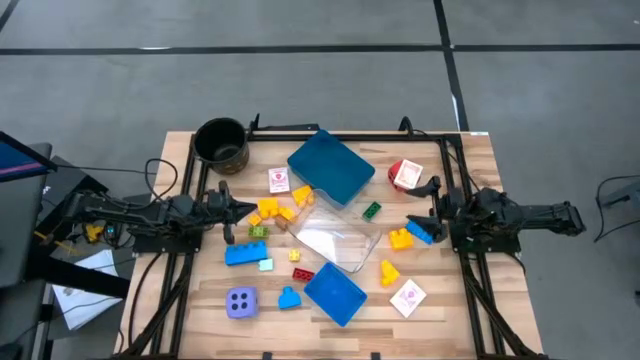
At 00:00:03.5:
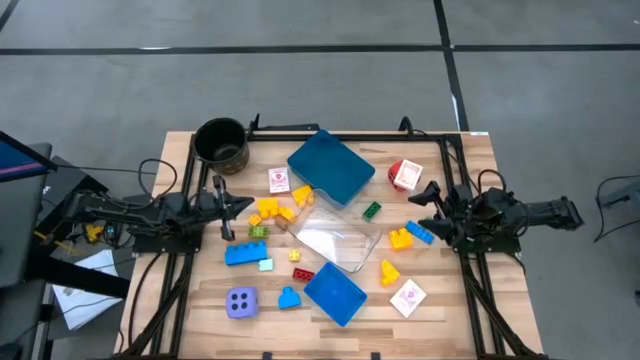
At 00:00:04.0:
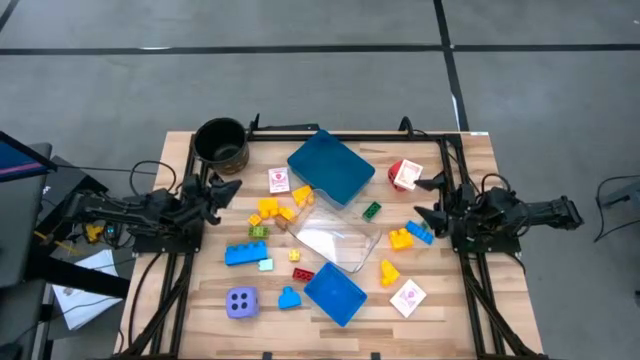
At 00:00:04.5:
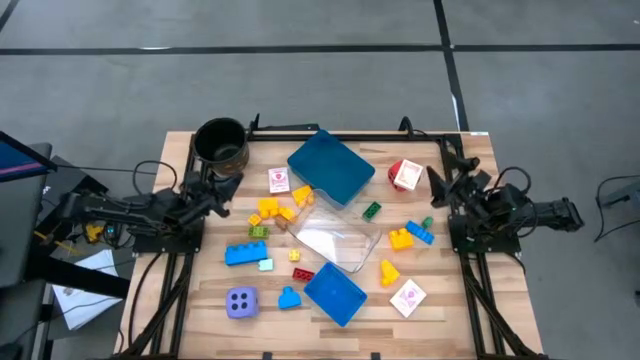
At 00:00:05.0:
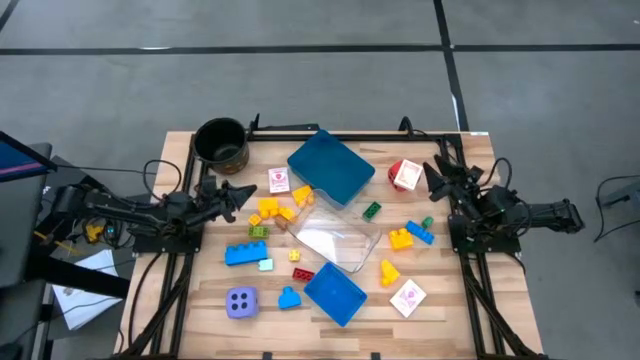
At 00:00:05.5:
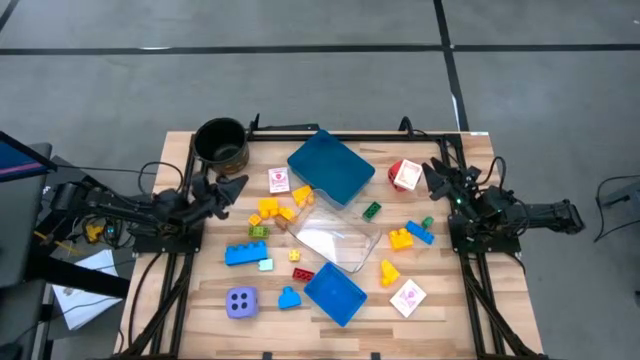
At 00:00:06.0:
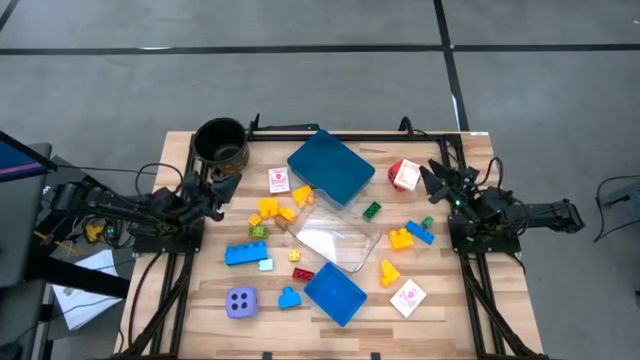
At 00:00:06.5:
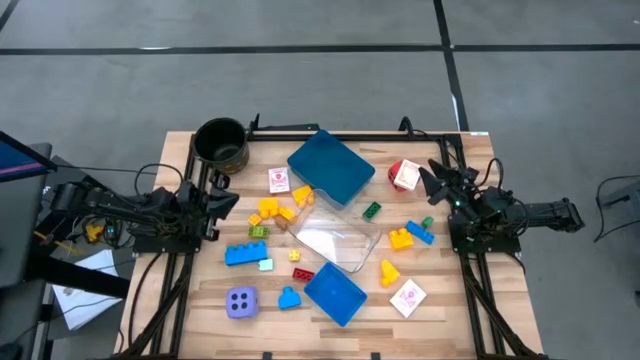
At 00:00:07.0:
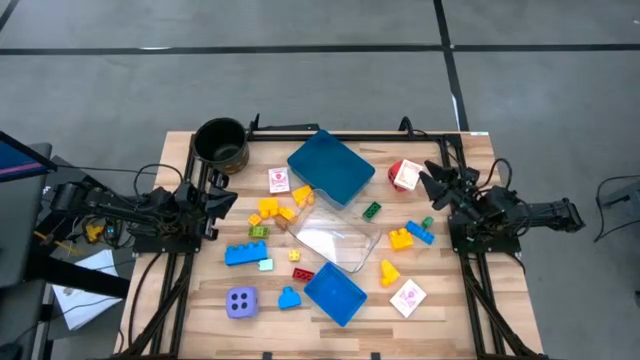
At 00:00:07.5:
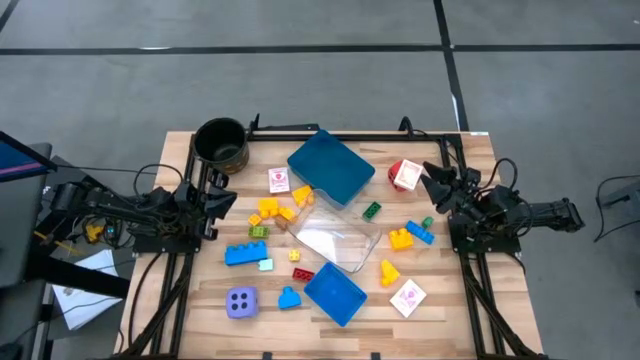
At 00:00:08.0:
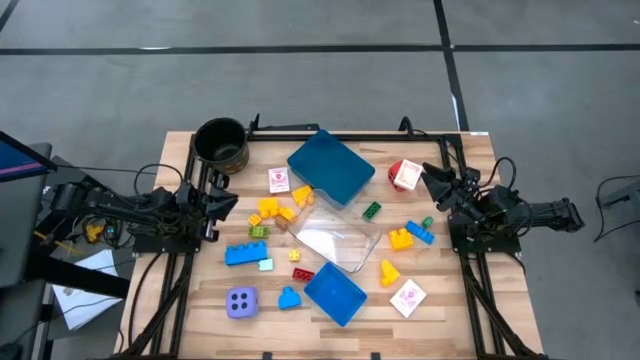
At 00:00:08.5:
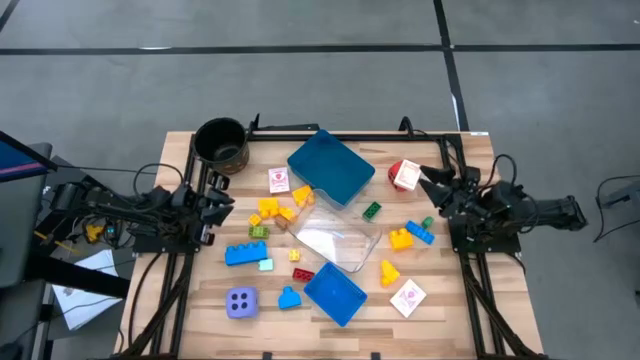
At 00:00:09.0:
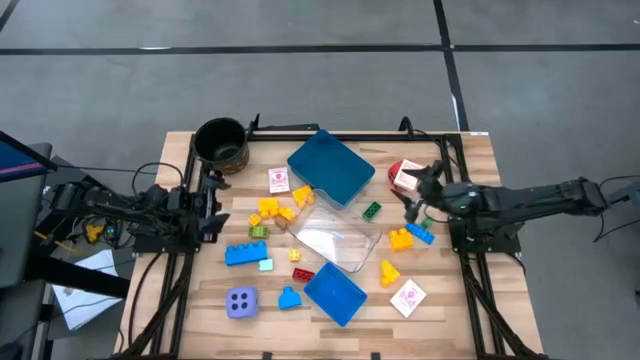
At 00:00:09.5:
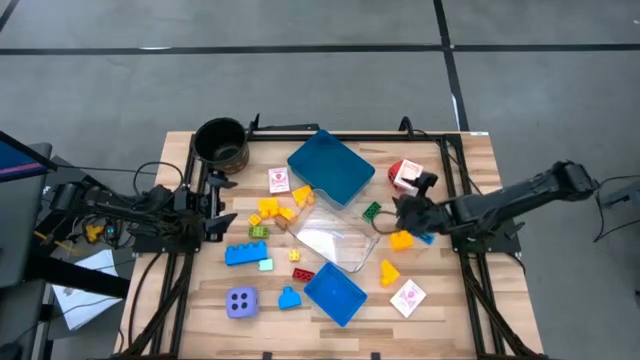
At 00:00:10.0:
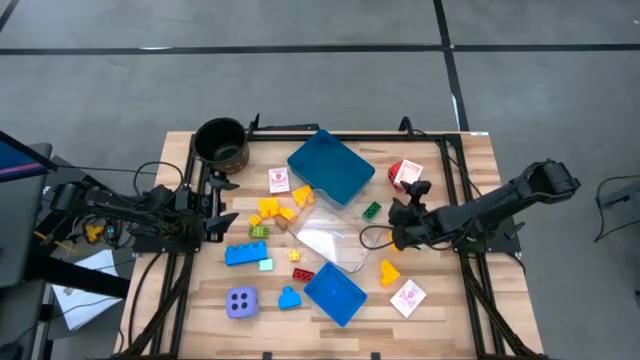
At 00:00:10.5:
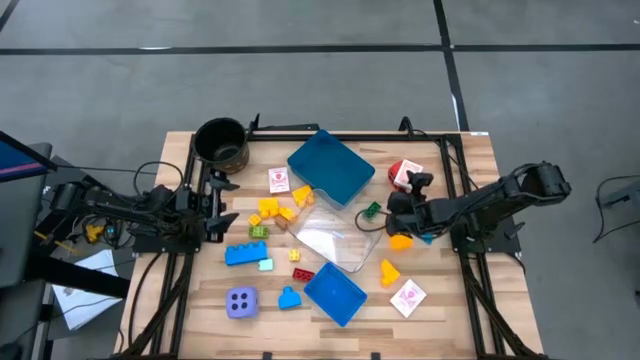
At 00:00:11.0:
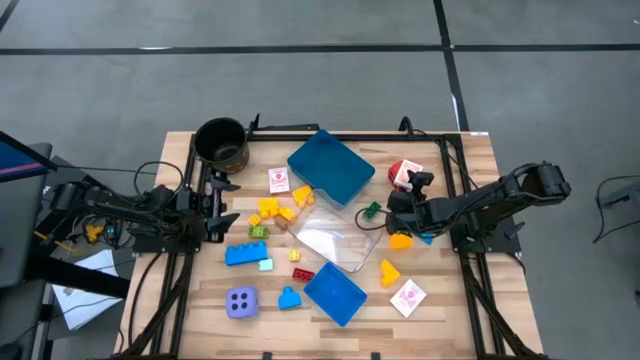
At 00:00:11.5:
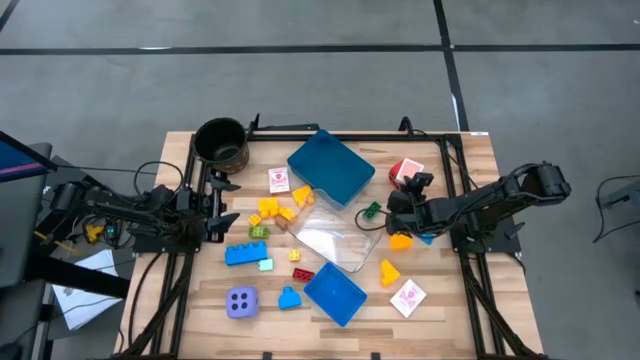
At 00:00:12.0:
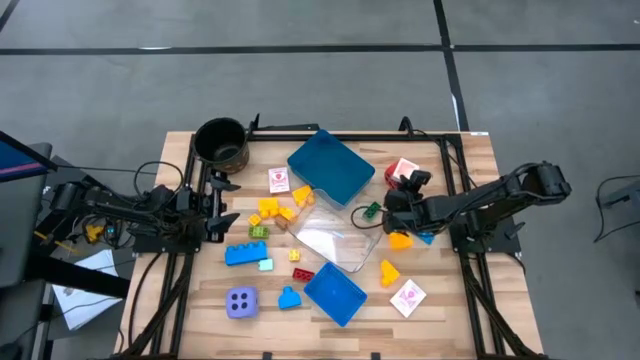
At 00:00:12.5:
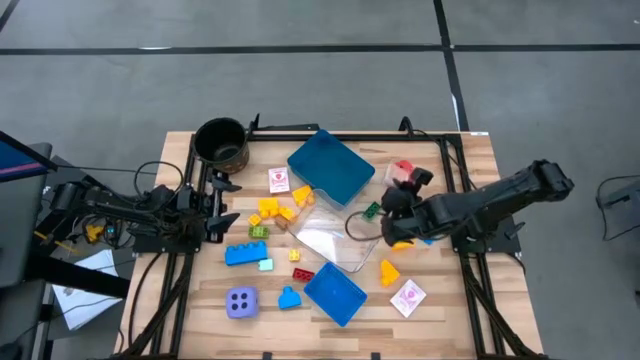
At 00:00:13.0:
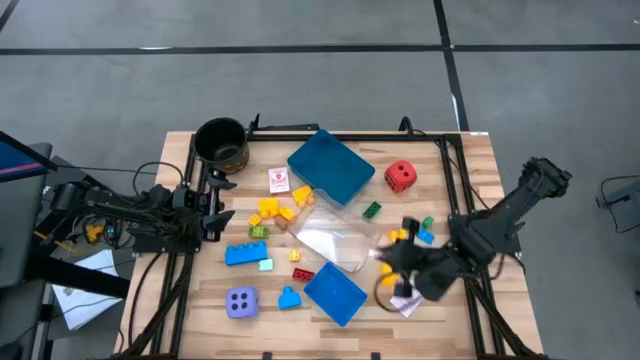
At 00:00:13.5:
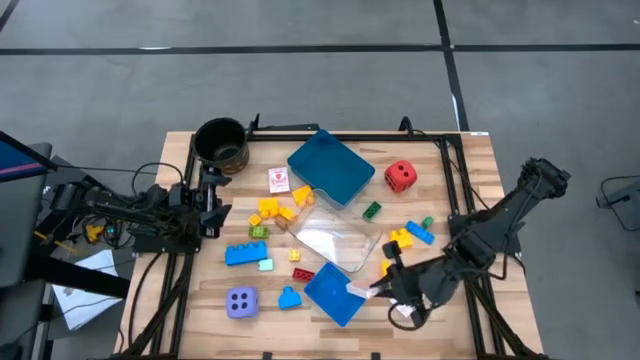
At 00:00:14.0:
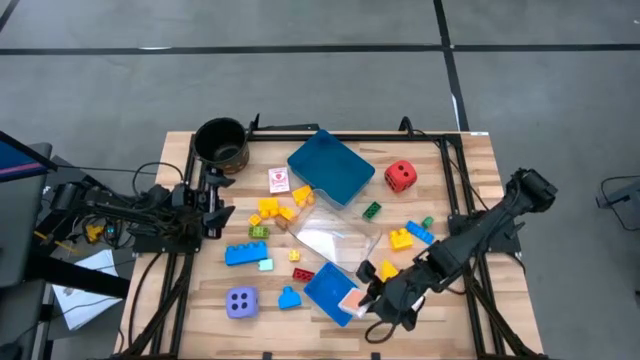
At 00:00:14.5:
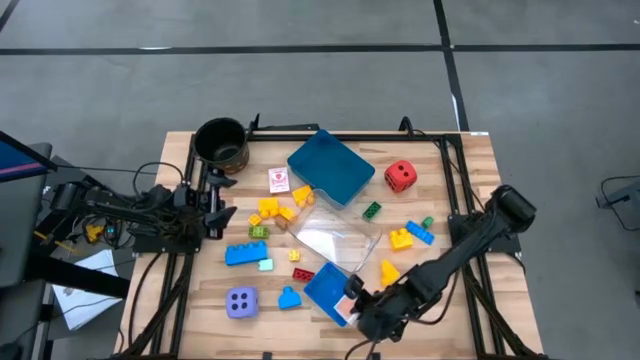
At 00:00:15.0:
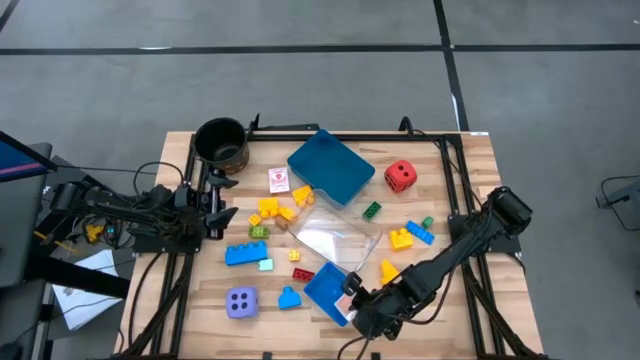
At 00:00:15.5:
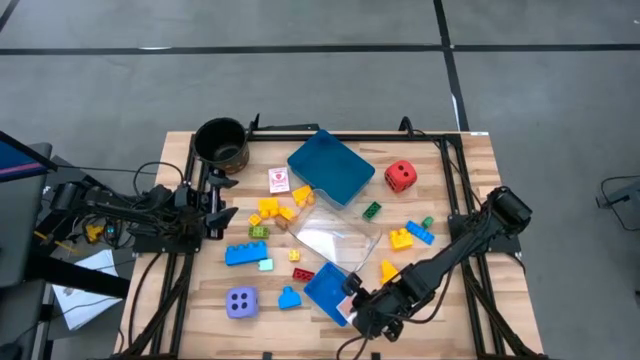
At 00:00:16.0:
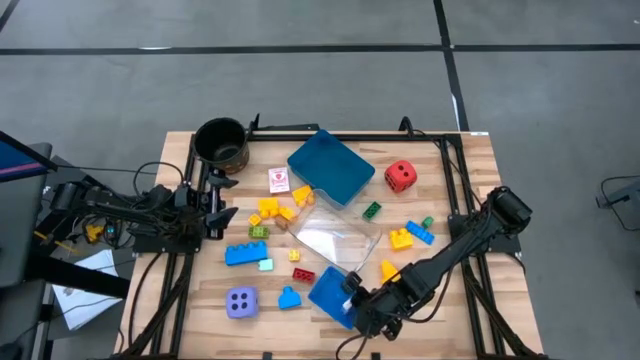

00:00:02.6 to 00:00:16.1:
Task: Pick & Place Toys
Put the orange playing card box into the blue bin

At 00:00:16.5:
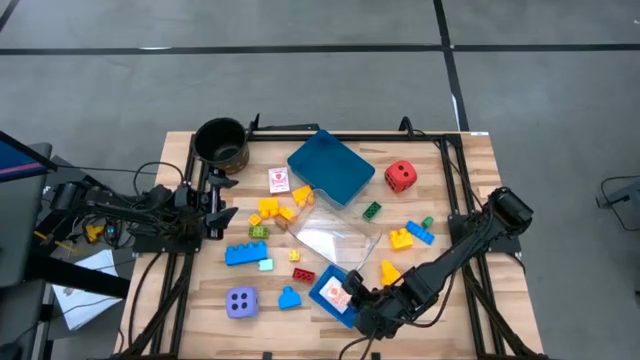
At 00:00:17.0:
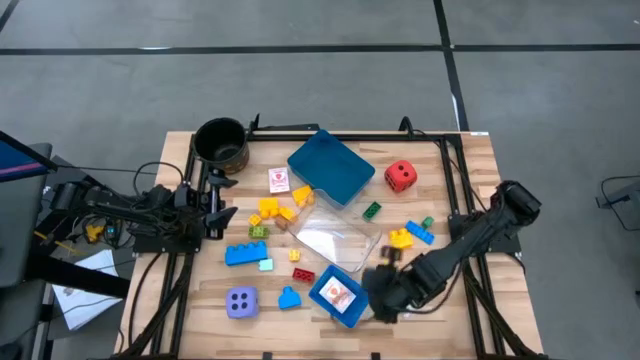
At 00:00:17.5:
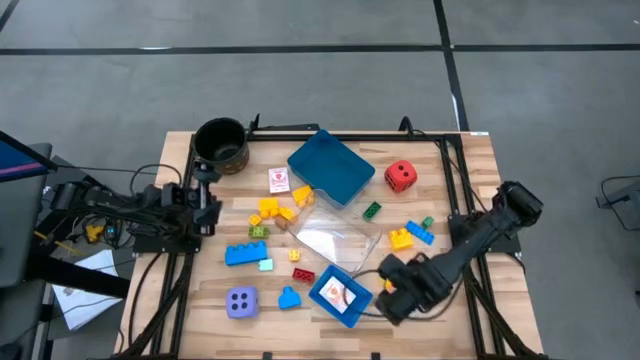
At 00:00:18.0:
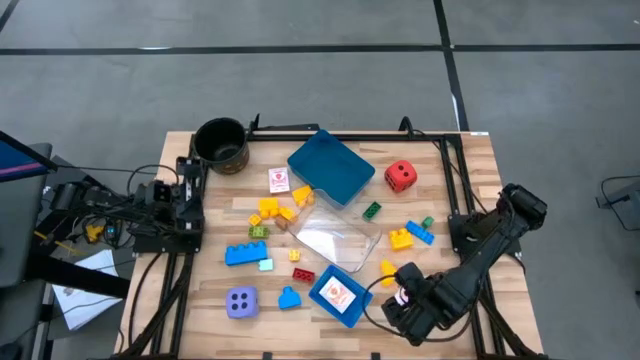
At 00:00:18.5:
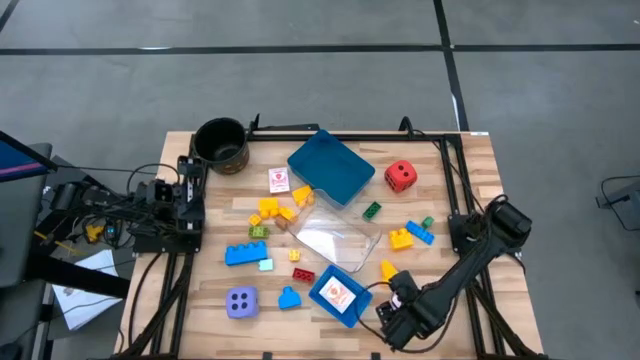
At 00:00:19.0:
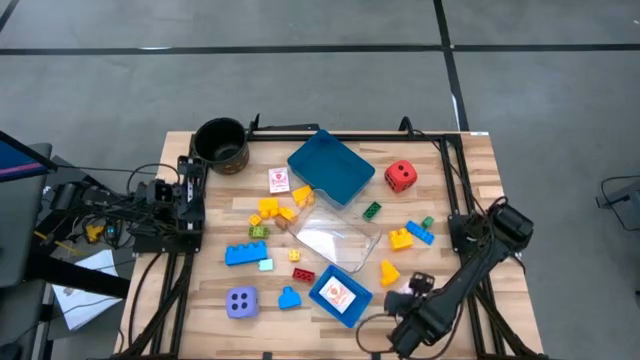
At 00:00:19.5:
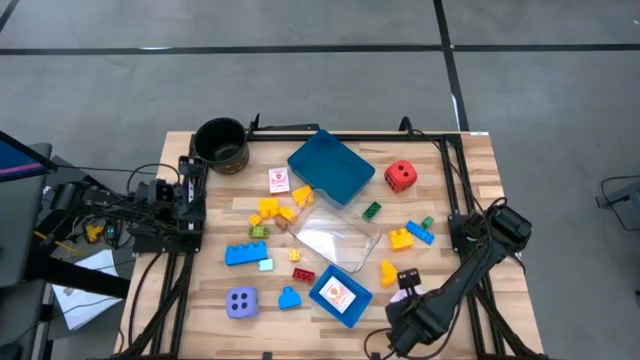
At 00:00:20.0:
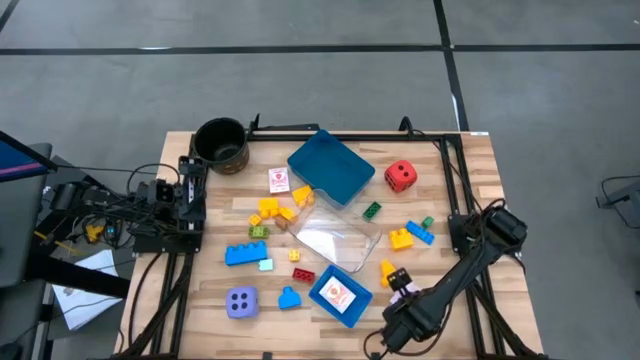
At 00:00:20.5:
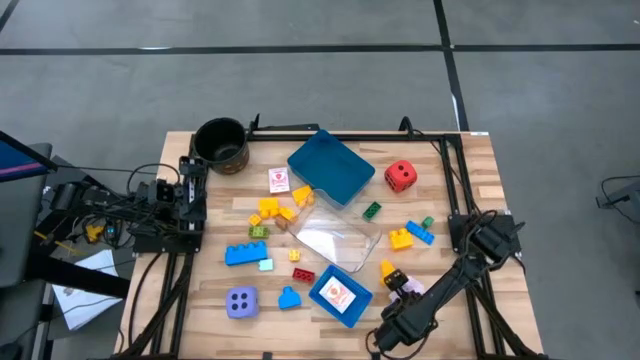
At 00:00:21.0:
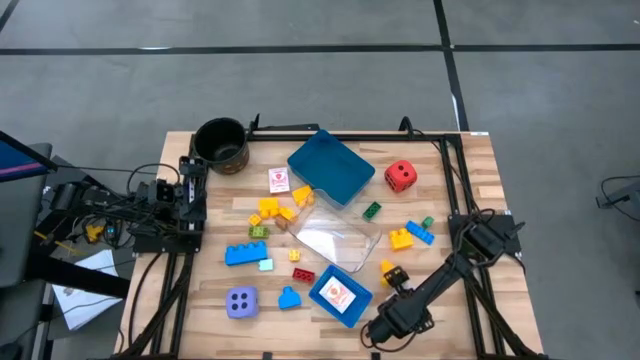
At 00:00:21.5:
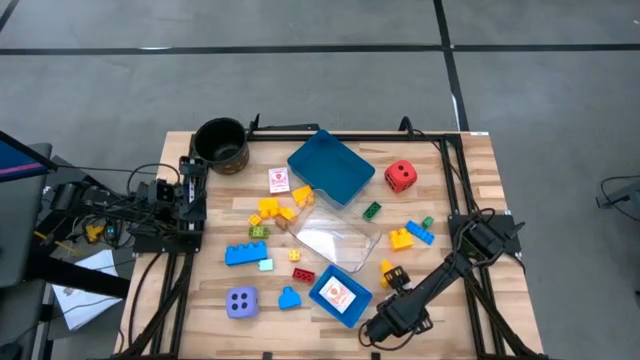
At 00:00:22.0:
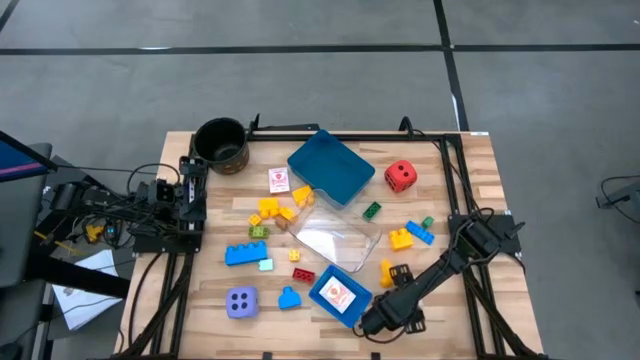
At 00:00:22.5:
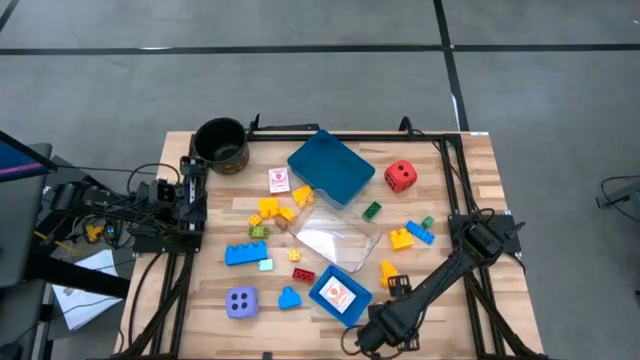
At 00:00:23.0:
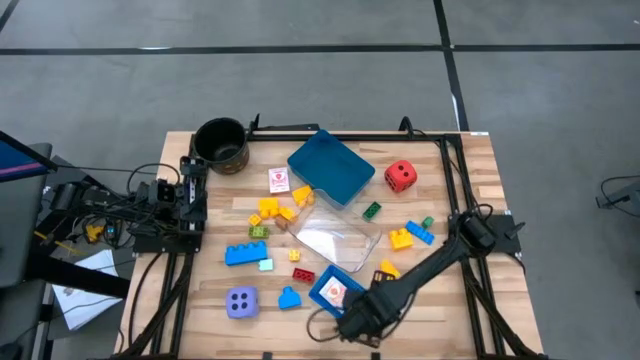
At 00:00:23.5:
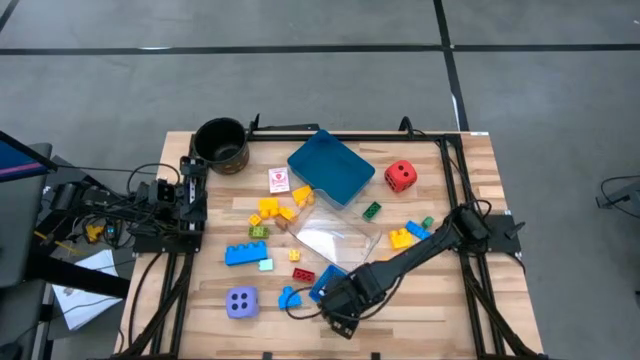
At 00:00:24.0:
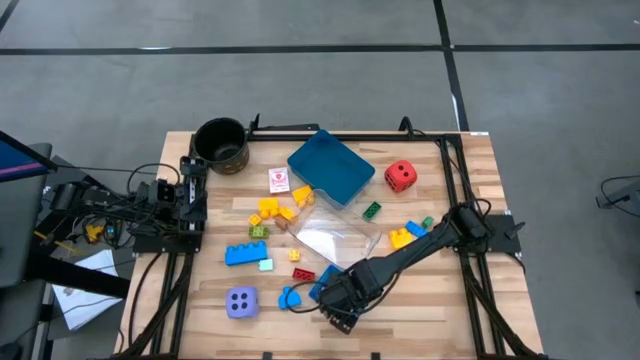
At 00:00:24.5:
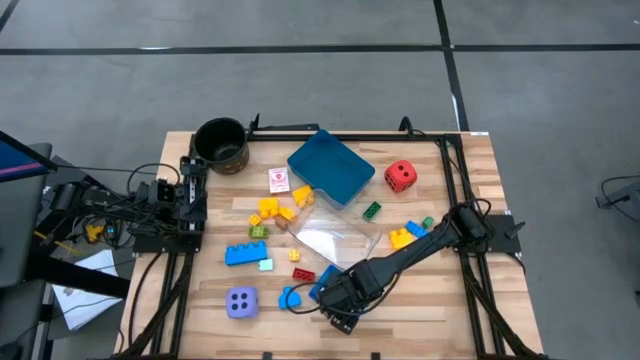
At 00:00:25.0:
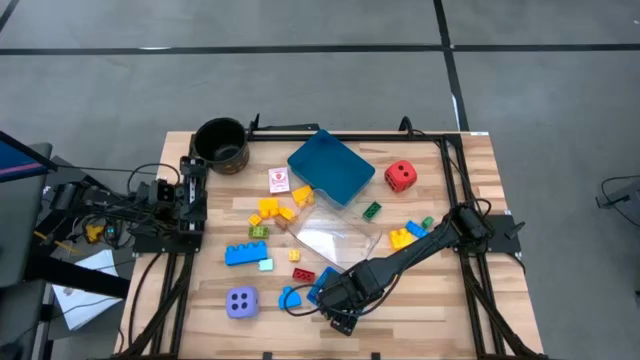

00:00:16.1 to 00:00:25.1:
Put the pink playing card box into the blue bin
